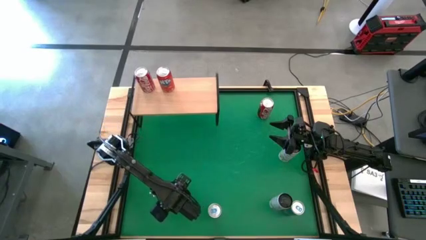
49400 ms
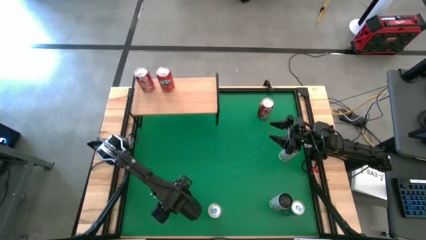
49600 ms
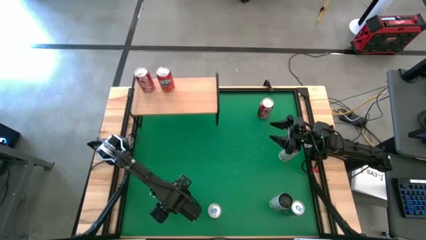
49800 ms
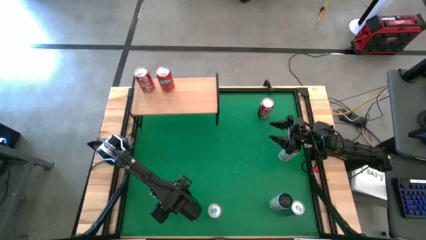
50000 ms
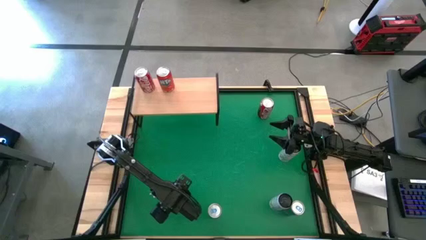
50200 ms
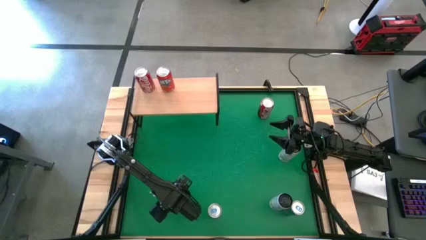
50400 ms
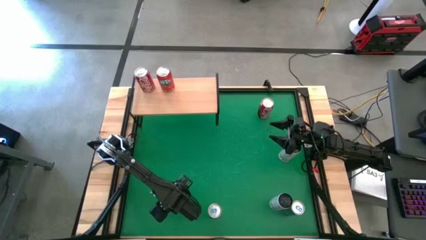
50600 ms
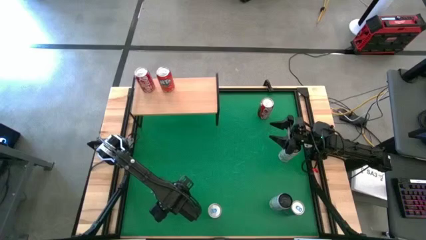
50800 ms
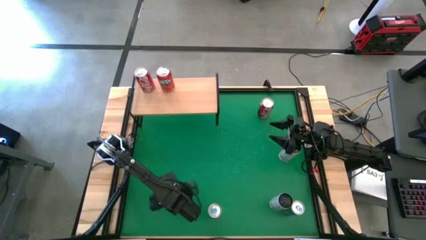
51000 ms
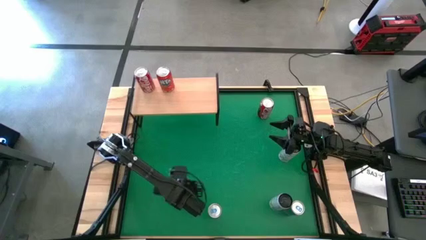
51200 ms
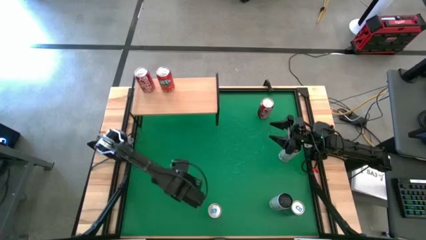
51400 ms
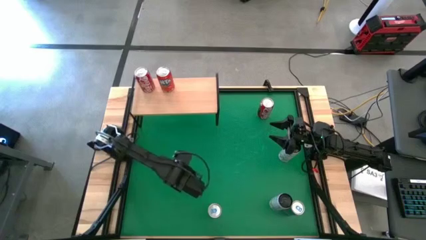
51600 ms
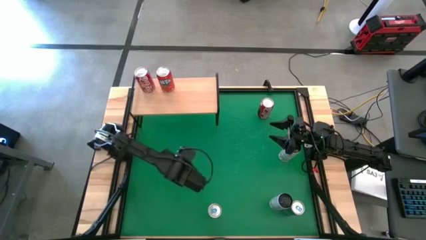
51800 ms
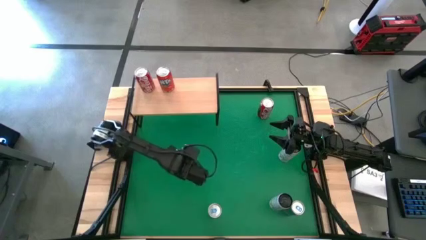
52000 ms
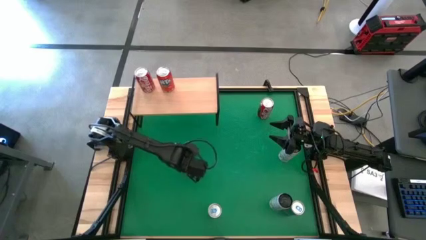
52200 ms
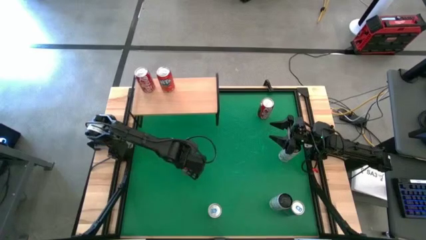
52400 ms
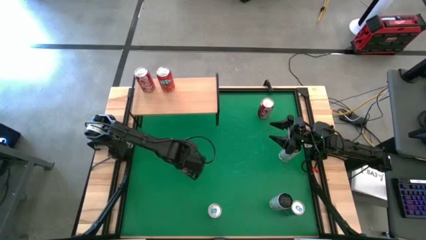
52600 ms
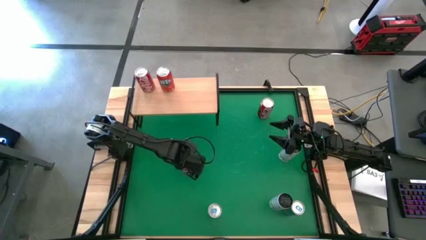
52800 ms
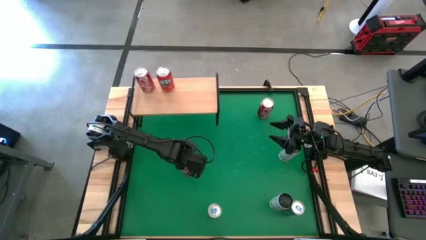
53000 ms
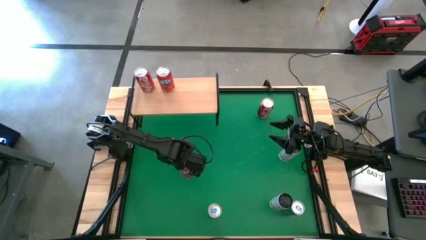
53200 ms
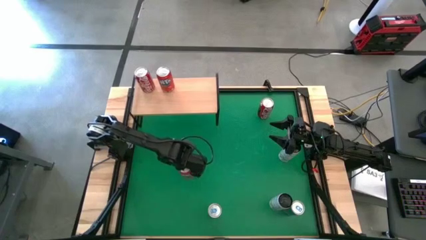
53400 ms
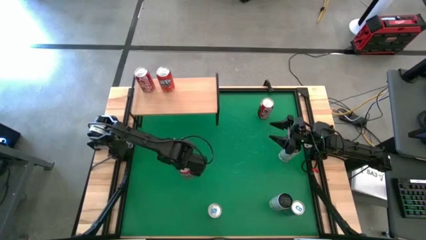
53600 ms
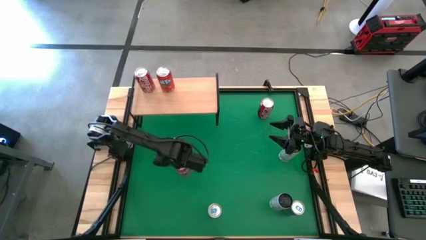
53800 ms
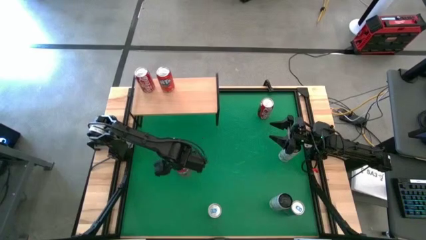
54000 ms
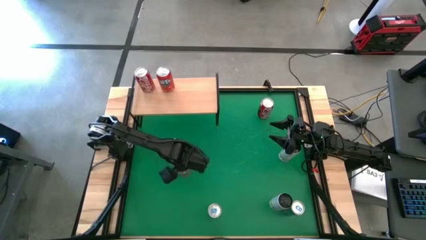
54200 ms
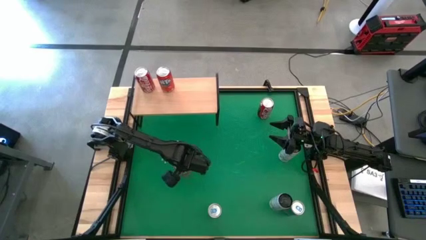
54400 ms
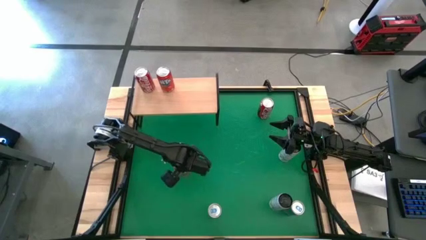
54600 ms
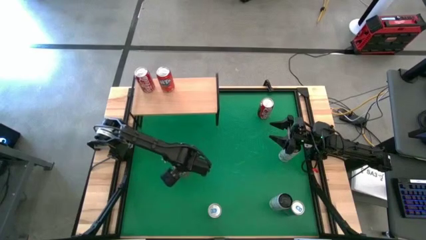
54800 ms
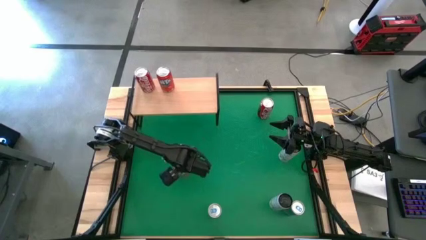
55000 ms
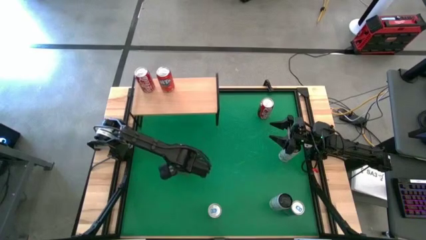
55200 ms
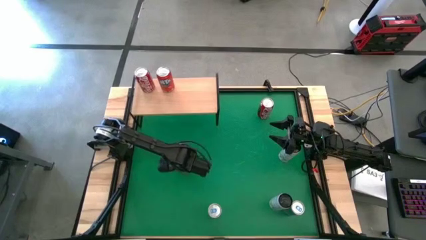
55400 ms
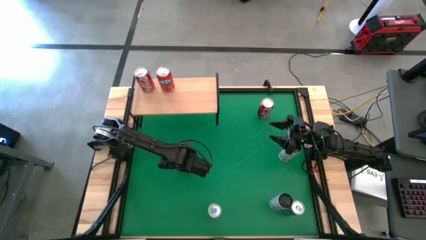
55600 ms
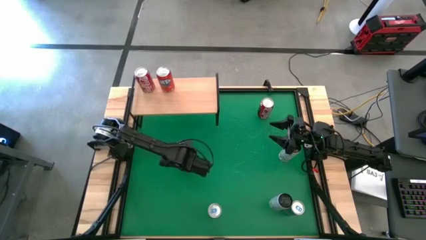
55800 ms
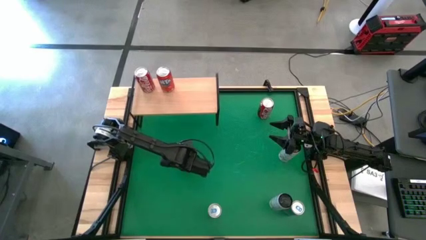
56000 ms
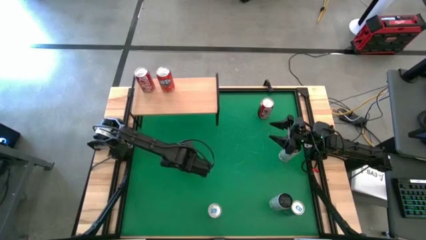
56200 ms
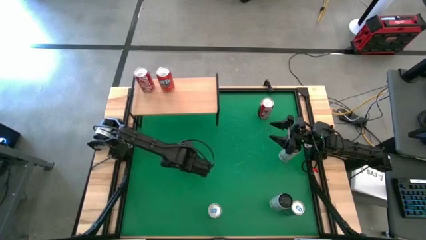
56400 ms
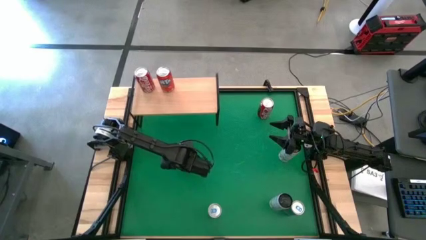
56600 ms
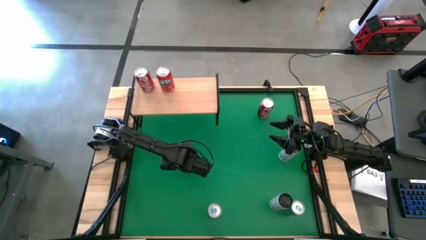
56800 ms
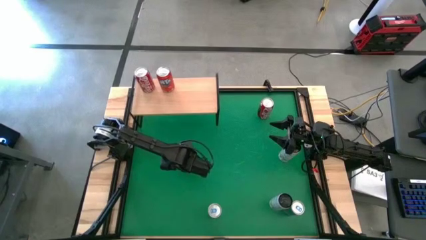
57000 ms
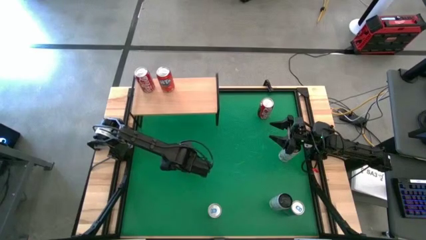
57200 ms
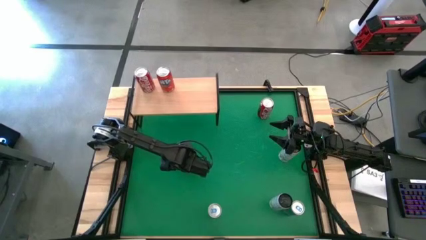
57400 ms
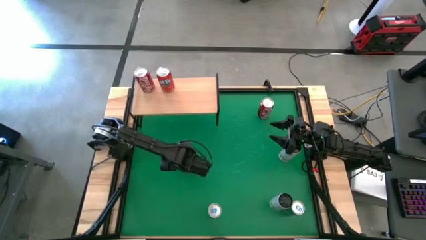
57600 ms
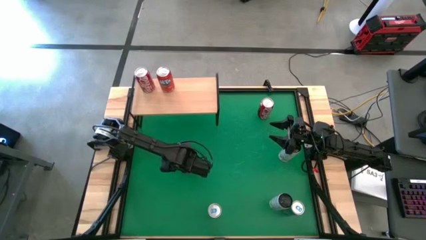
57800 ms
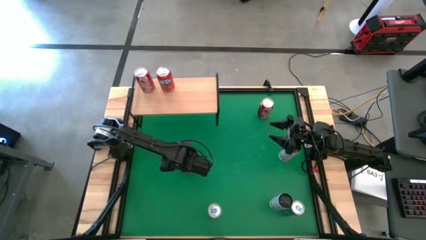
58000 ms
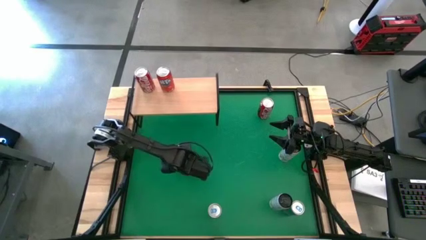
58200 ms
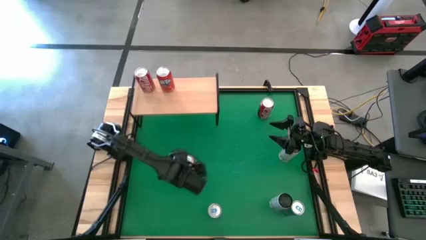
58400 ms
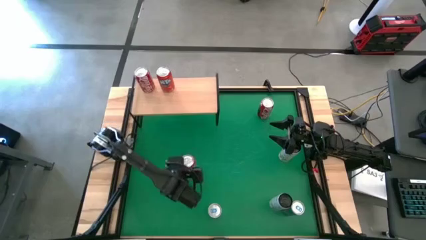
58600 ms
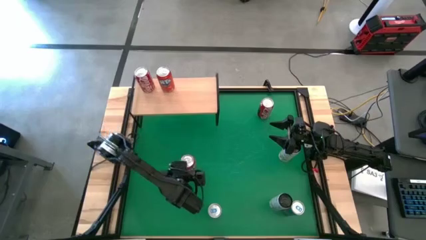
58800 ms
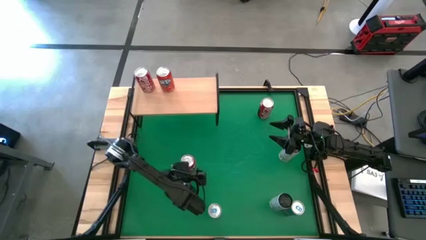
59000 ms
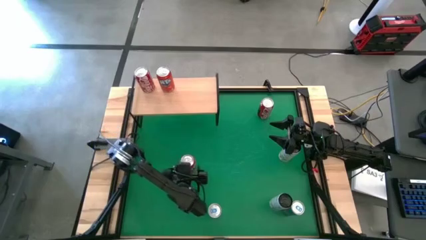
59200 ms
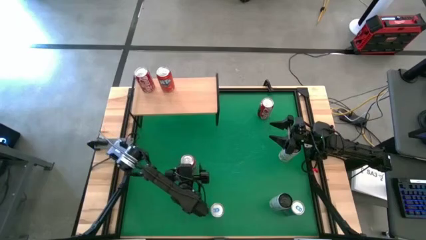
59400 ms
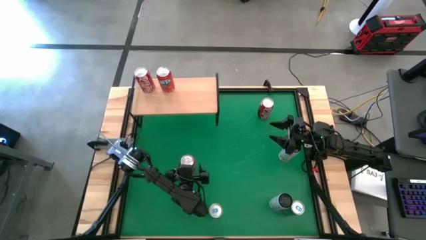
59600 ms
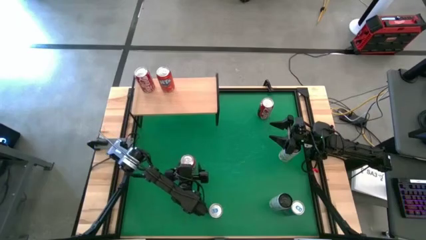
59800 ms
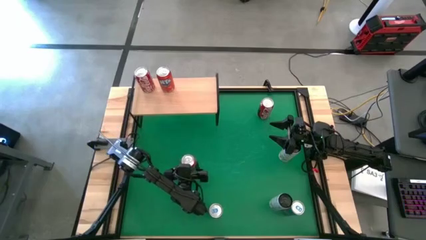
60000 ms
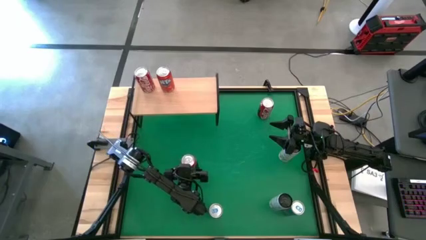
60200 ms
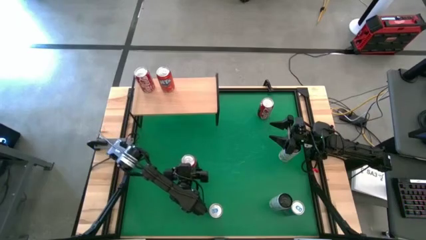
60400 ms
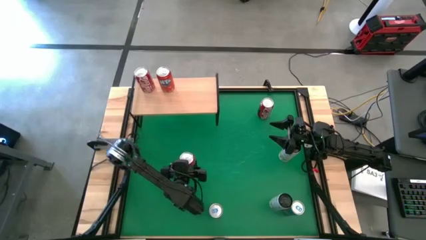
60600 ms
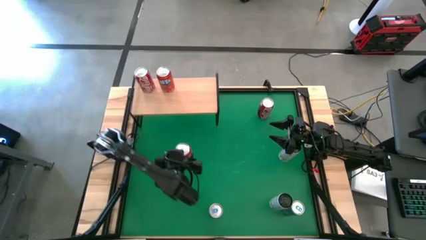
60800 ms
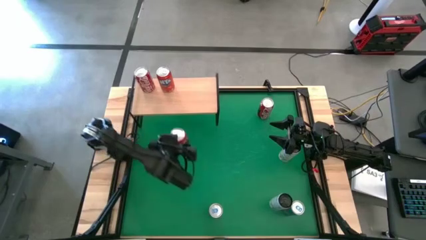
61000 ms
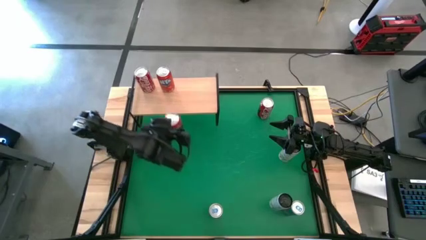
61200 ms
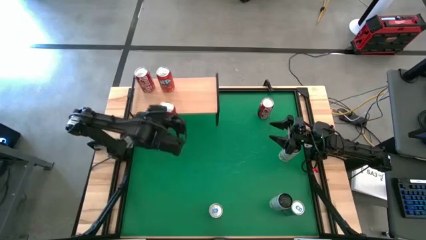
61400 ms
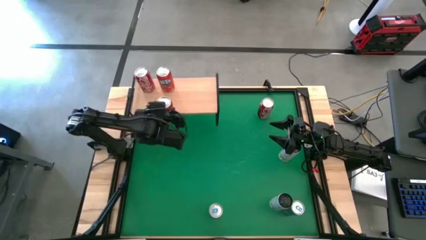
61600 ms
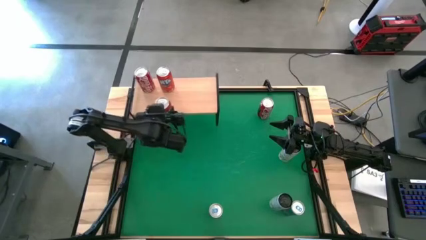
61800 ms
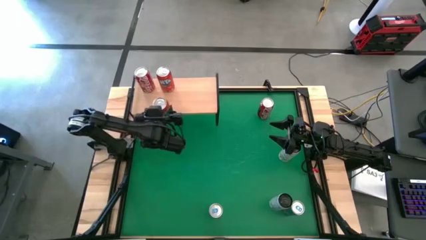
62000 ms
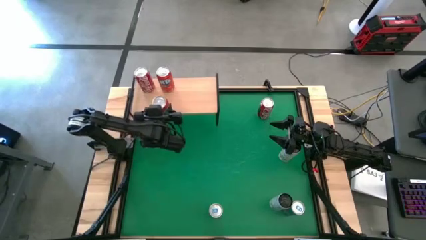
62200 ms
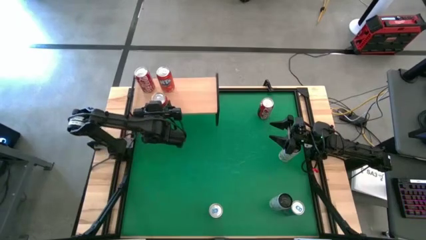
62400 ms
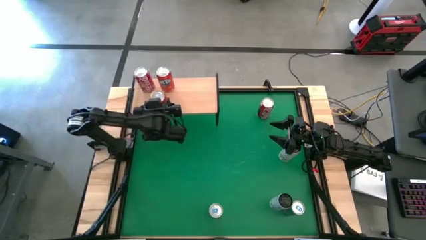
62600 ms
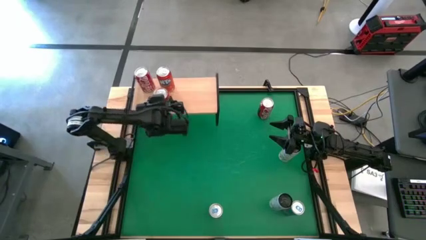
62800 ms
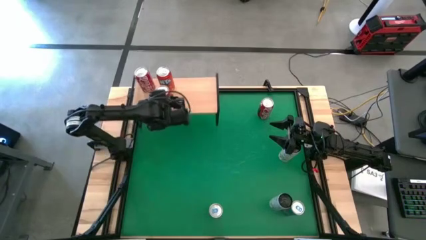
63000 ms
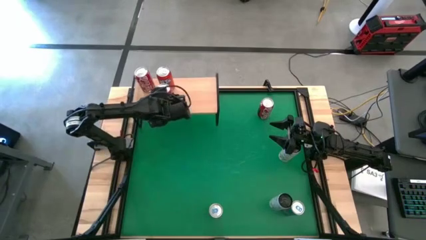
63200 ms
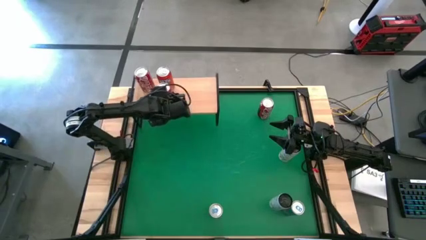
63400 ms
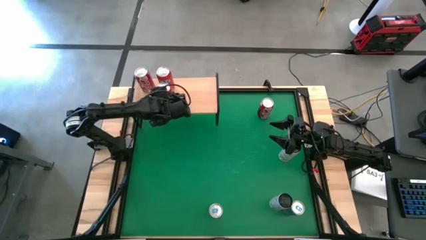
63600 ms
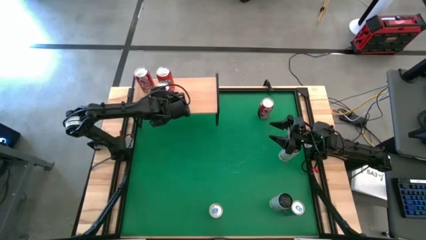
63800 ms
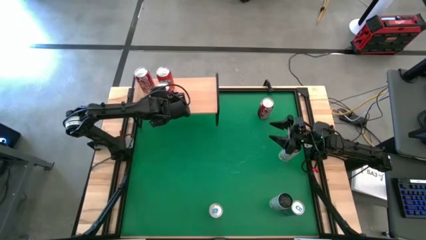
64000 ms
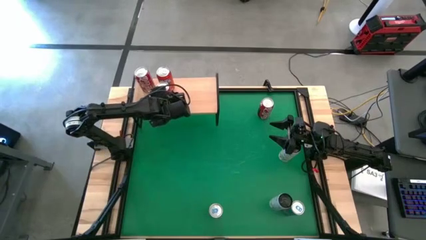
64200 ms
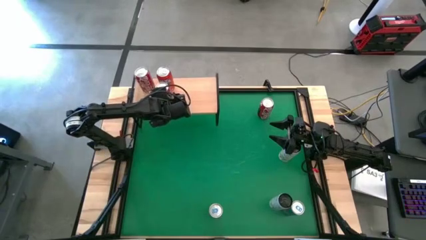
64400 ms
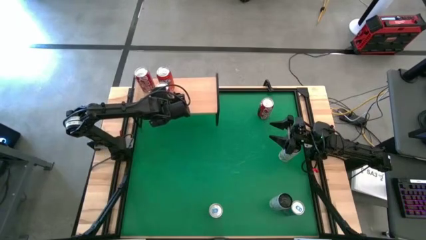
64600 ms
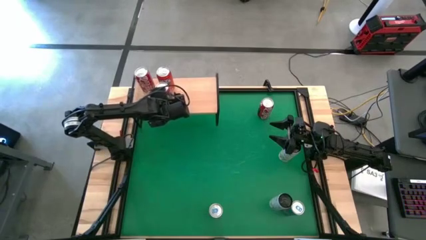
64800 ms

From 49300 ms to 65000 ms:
Task: Place canned beverage on shelf
Put the red soda can aligned with the other red soda can on the shelf
